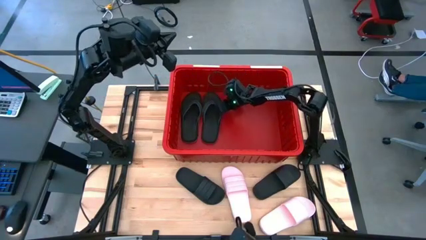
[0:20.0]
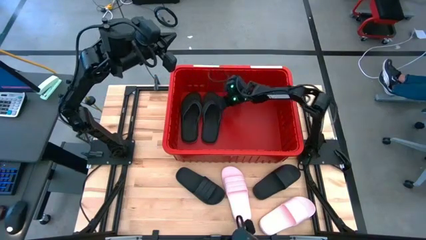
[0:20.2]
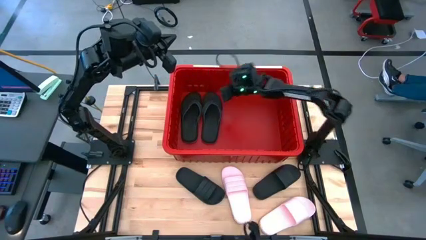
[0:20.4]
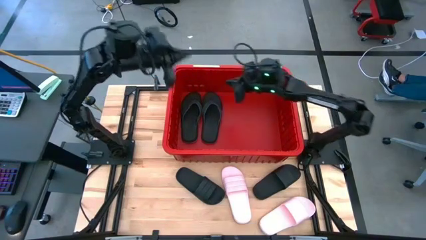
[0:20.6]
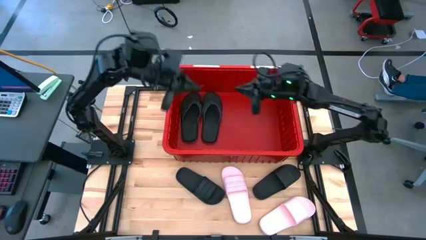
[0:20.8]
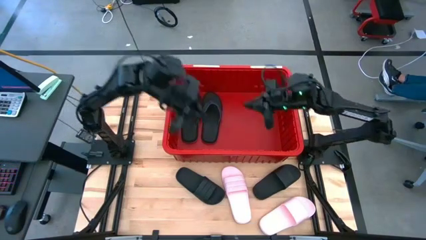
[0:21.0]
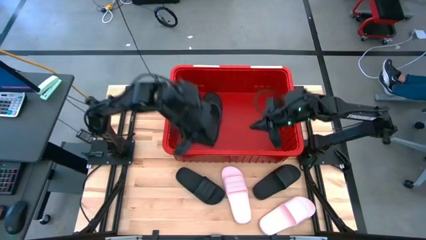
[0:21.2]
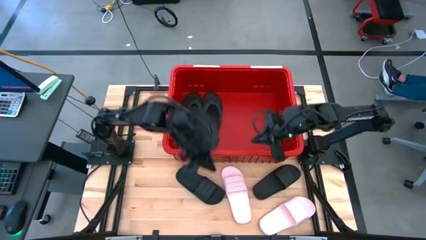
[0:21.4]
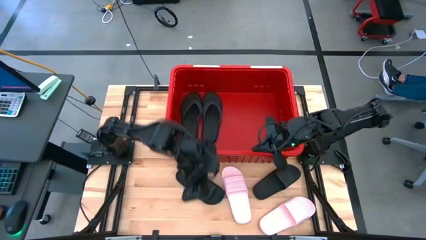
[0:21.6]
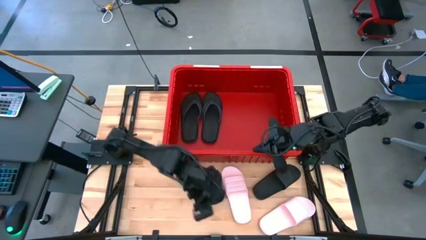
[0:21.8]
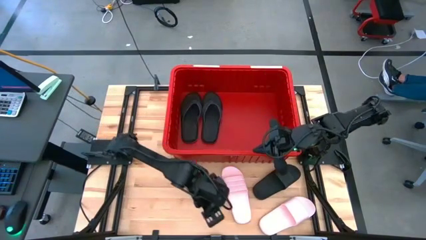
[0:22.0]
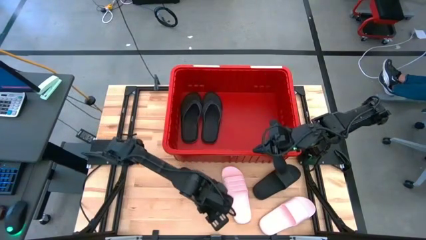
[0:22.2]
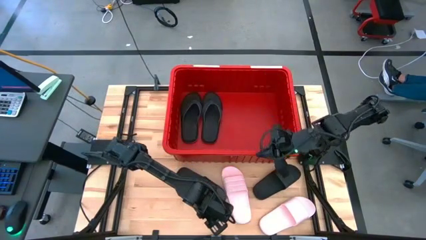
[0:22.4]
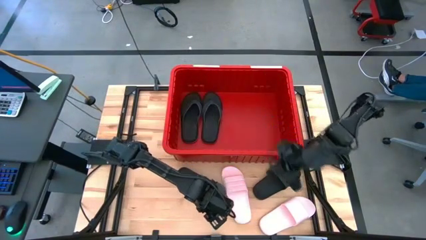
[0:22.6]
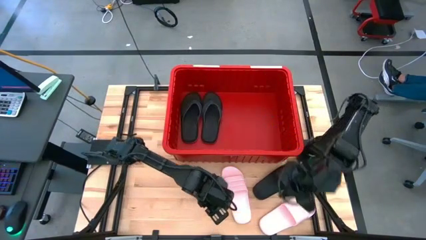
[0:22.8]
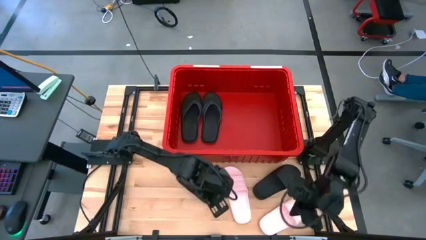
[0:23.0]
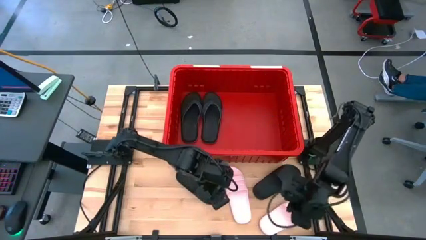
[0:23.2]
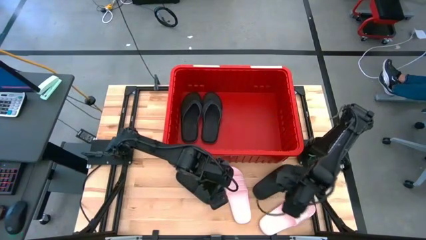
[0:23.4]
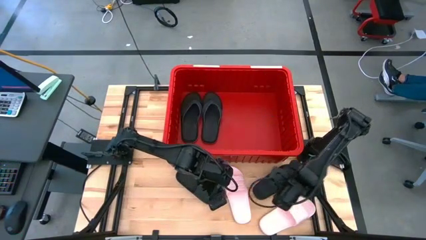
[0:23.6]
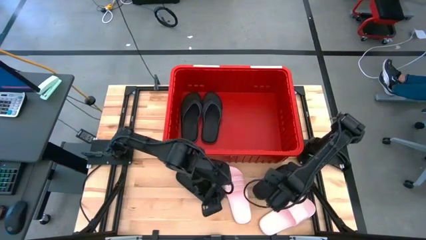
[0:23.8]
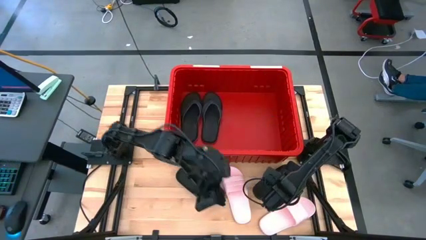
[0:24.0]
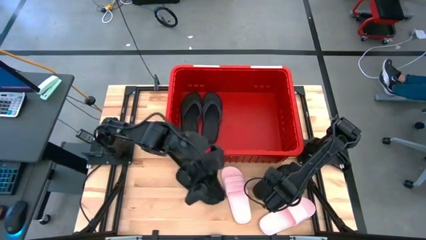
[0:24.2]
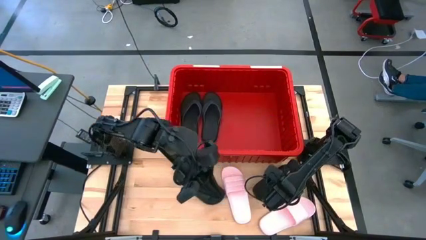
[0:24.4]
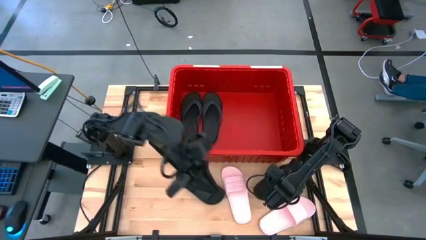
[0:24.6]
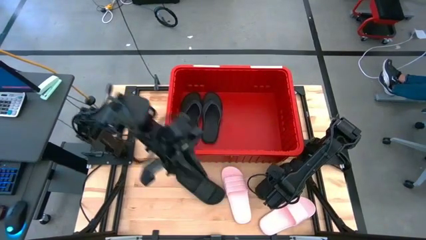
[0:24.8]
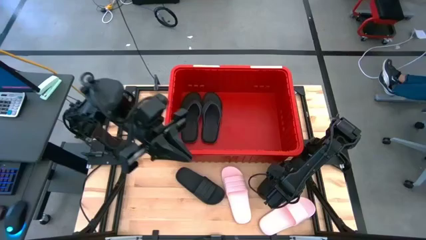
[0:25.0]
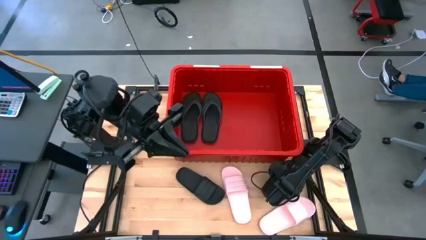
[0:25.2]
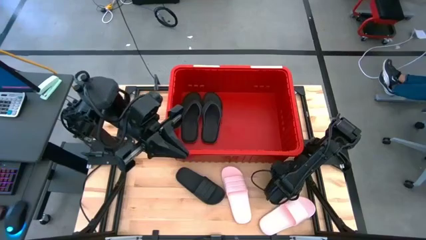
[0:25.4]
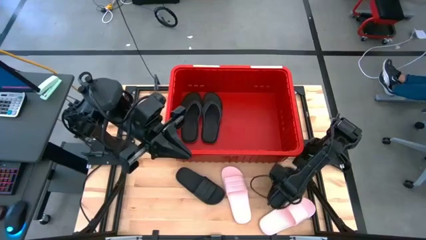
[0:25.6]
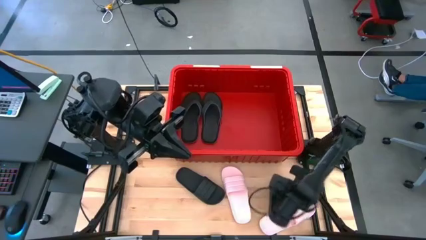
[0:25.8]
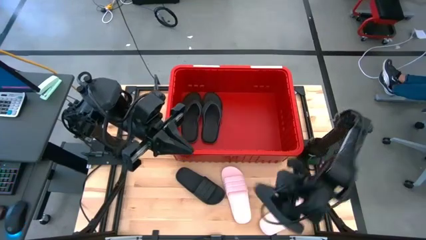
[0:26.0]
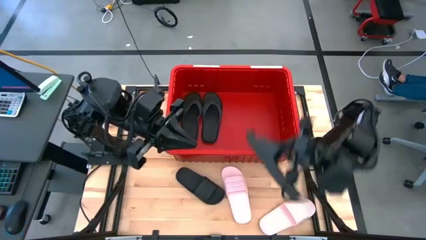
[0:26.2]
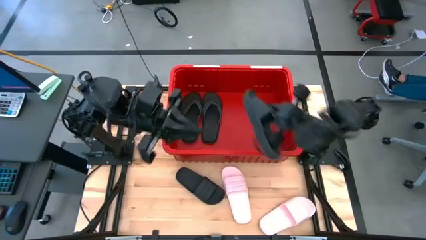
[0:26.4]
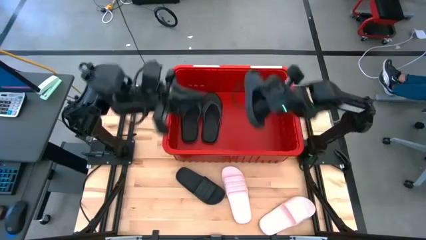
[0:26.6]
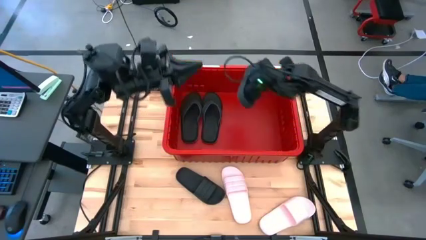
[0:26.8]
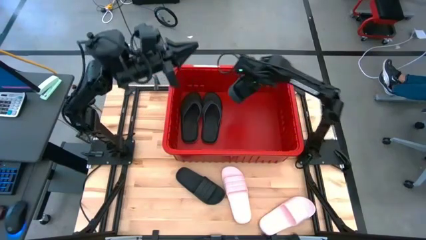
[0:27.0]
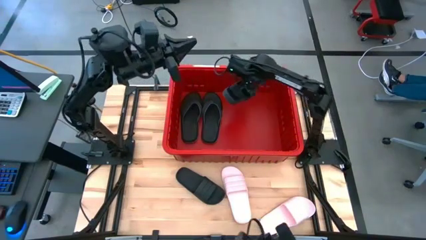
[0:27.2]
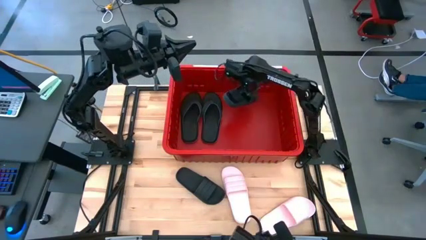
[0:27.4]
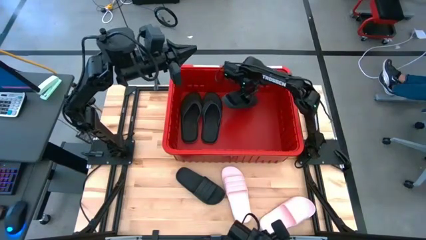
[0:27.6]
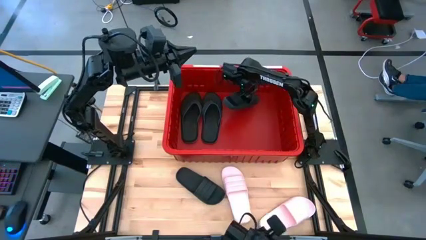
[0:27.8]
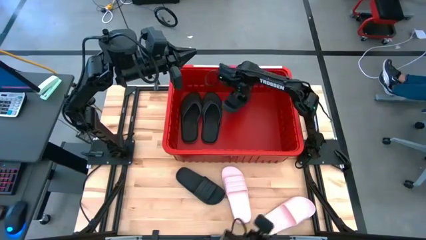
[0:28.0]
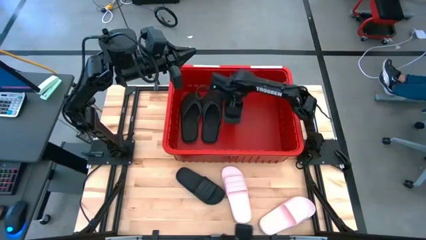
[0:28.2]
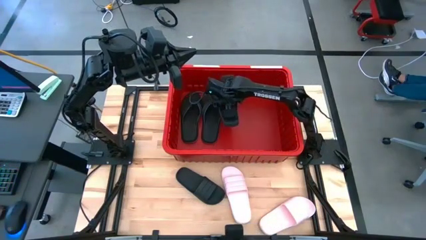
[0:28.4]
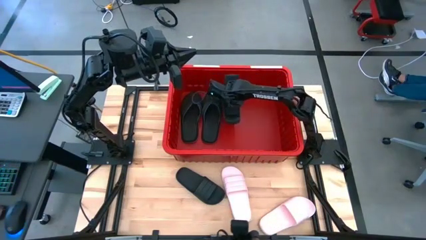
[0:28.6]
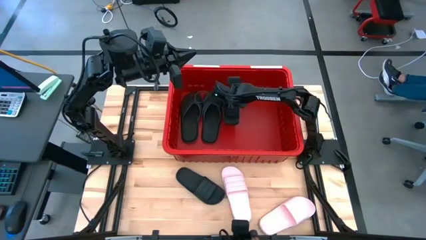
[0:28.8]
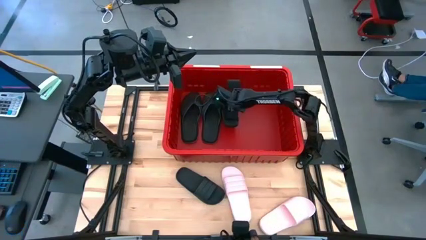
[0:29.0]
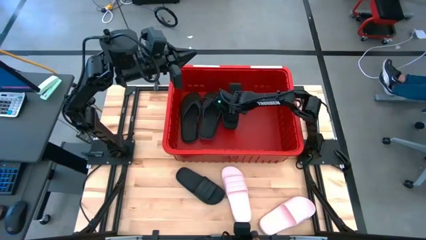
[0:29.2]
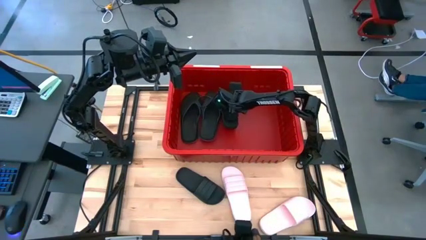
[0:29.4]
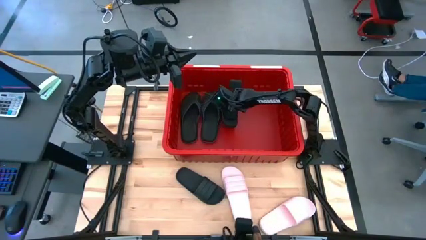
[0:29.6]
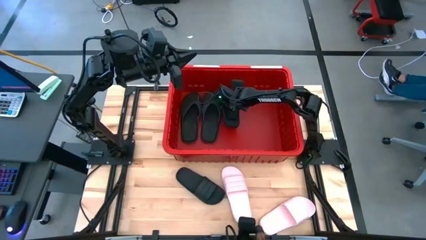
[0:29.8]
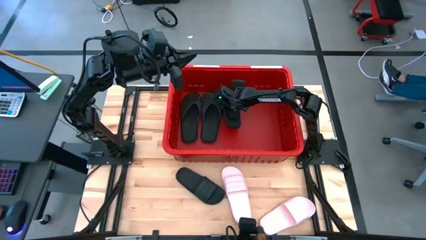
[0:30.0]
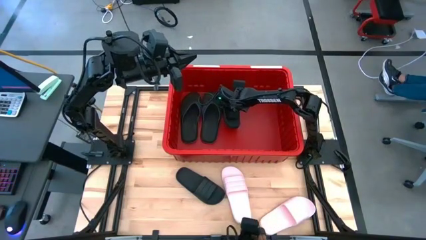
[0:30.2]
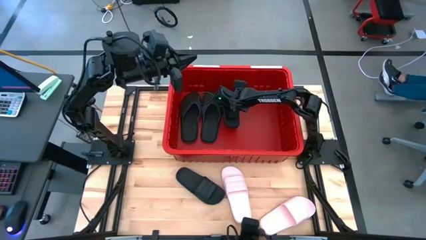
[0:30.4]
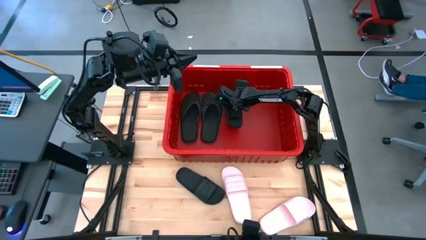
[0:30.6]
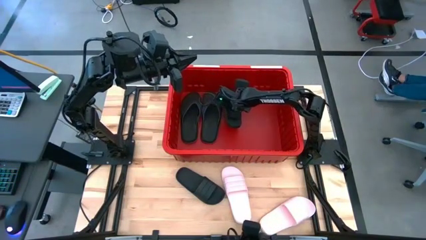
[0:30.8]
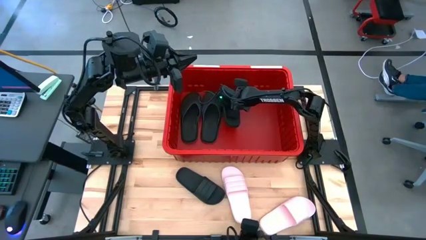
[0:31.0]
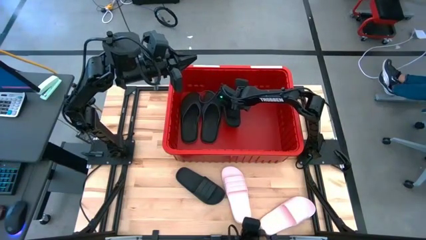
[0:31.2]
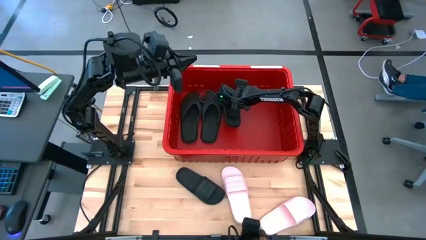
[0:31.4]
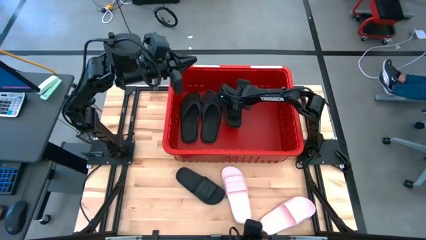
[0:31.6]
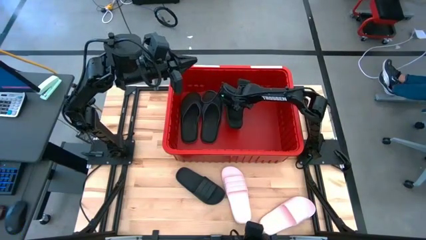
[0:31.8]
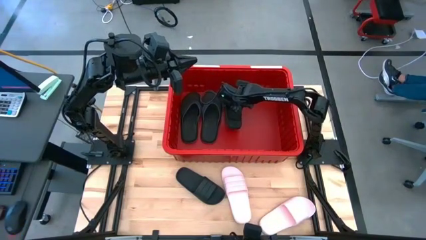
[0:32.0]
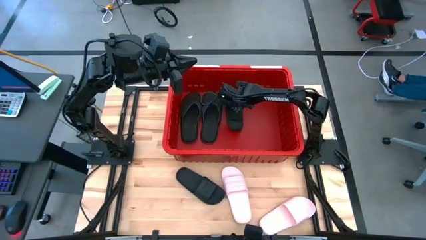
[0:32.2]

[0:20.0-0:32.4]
Task: Pick and place slides into bin
Put the right black slide into the red bin
